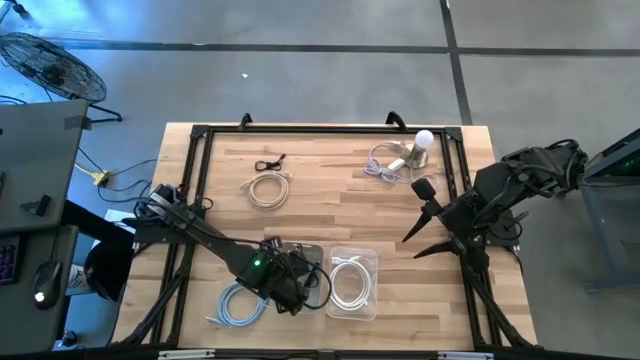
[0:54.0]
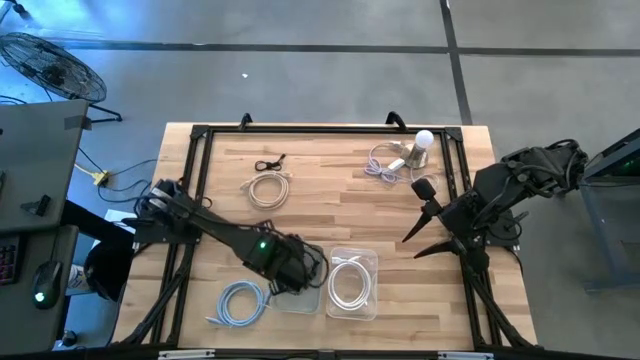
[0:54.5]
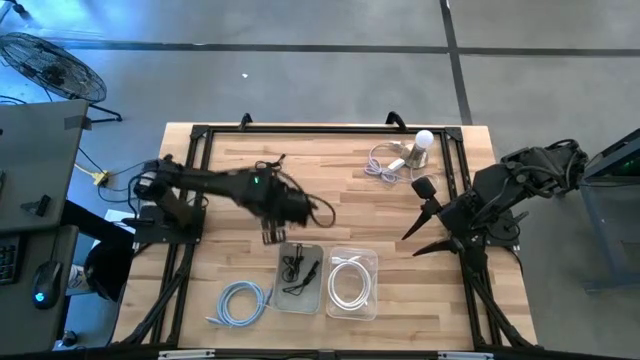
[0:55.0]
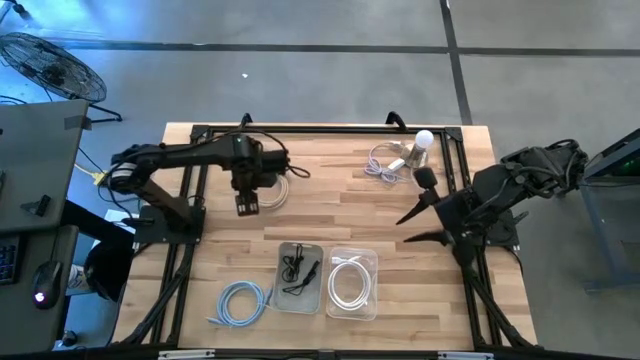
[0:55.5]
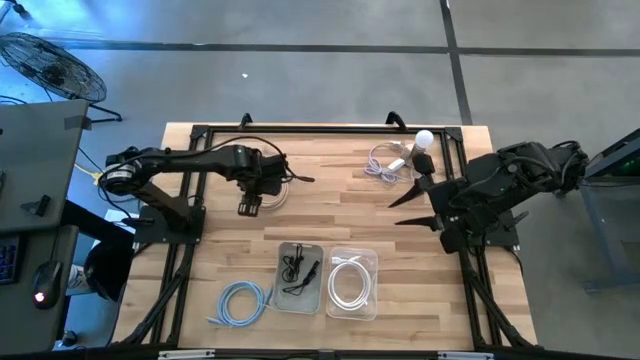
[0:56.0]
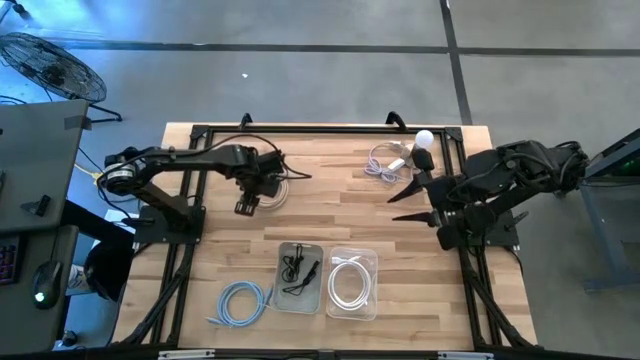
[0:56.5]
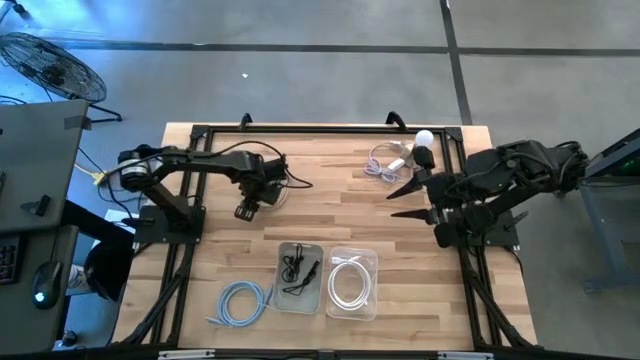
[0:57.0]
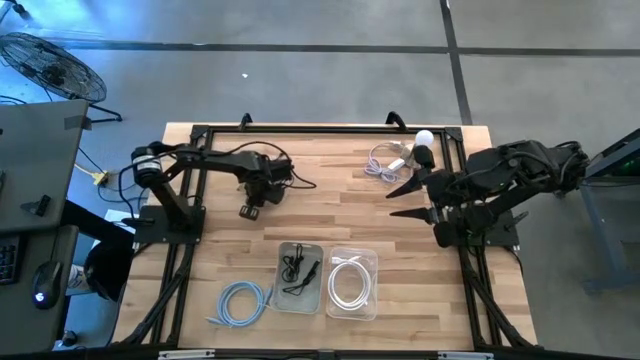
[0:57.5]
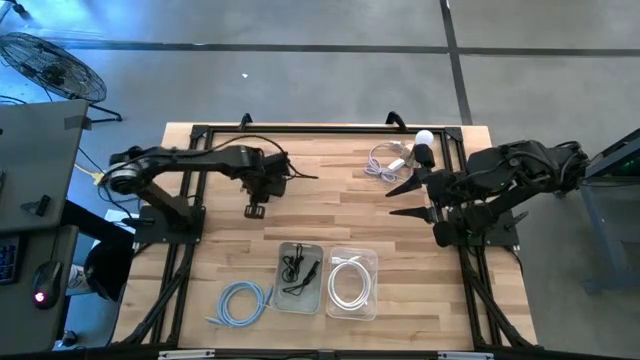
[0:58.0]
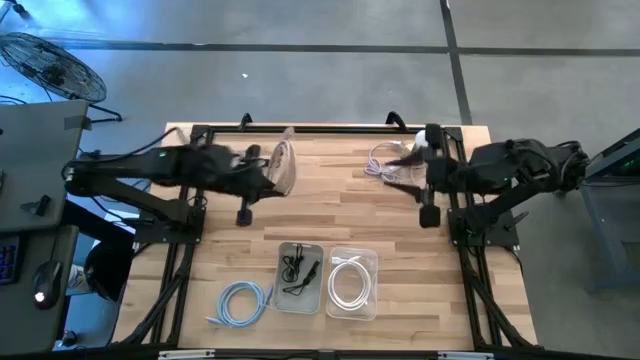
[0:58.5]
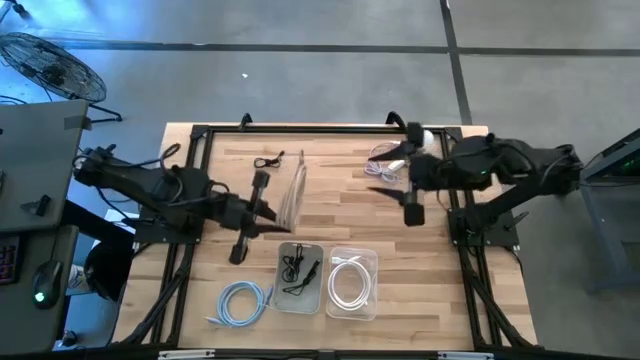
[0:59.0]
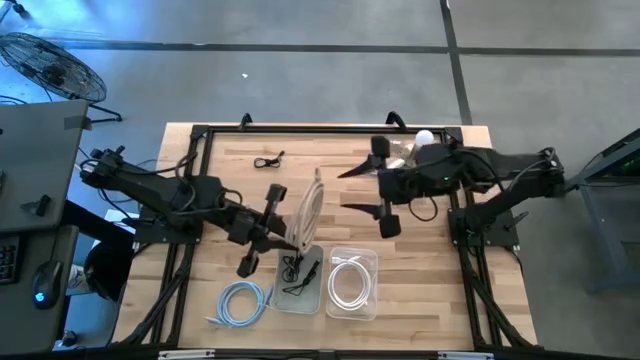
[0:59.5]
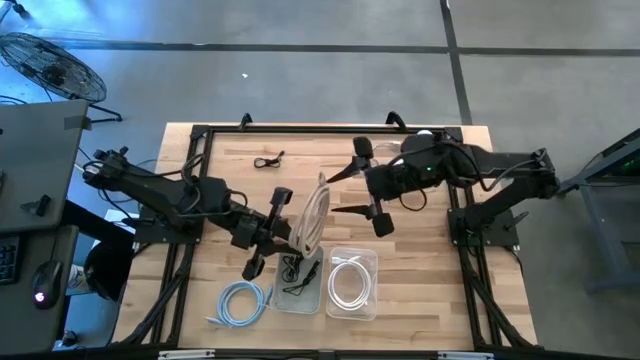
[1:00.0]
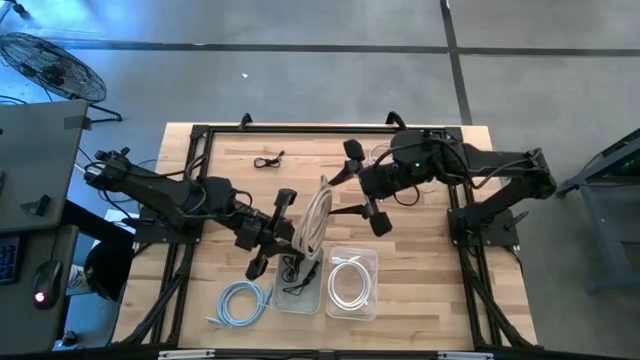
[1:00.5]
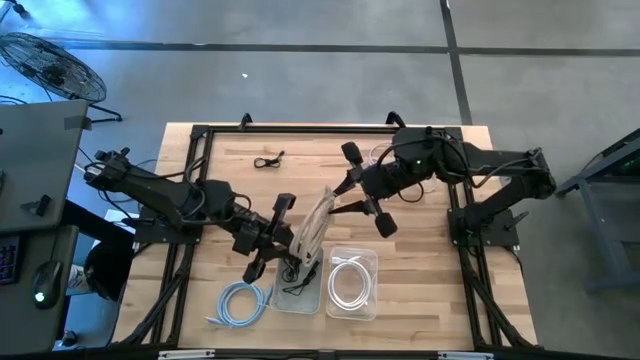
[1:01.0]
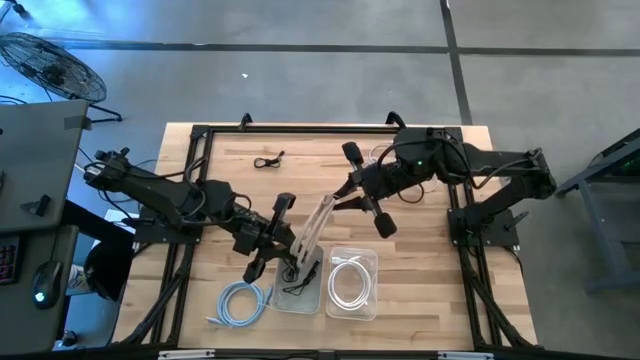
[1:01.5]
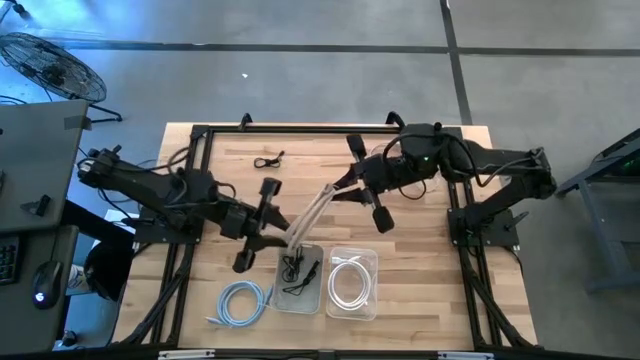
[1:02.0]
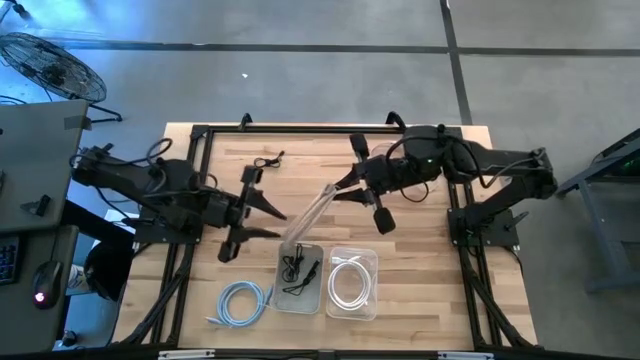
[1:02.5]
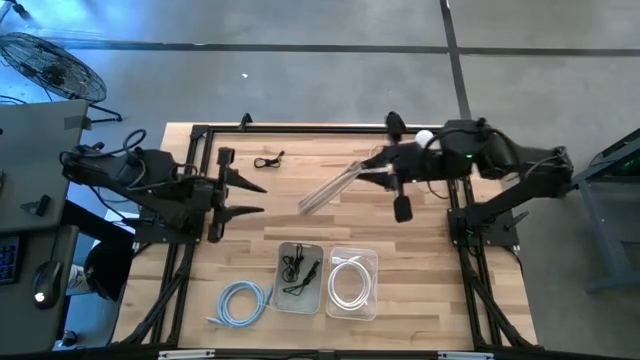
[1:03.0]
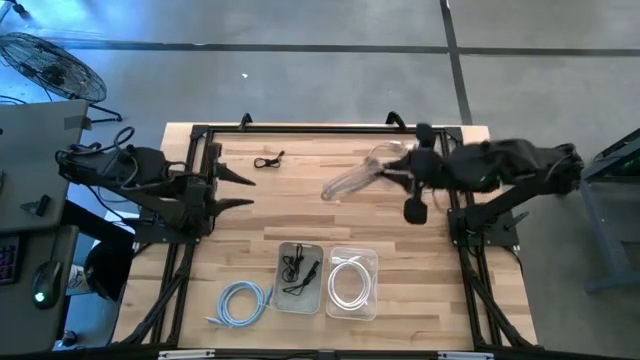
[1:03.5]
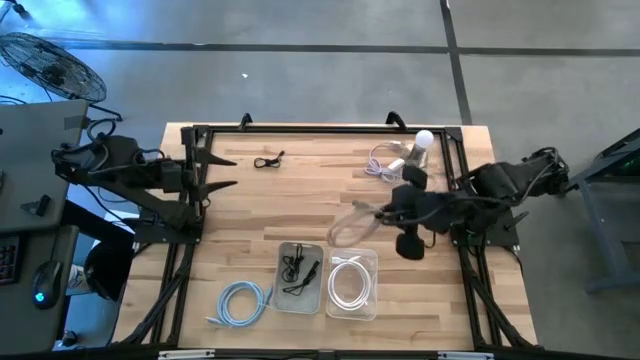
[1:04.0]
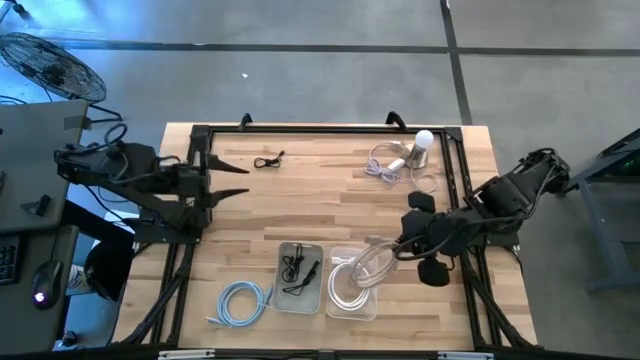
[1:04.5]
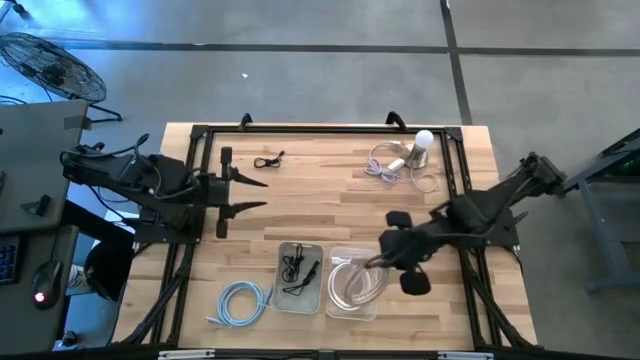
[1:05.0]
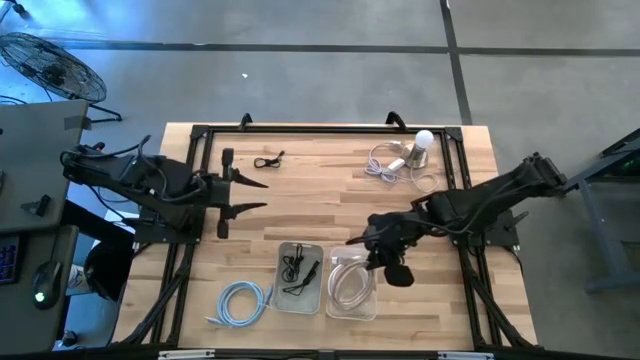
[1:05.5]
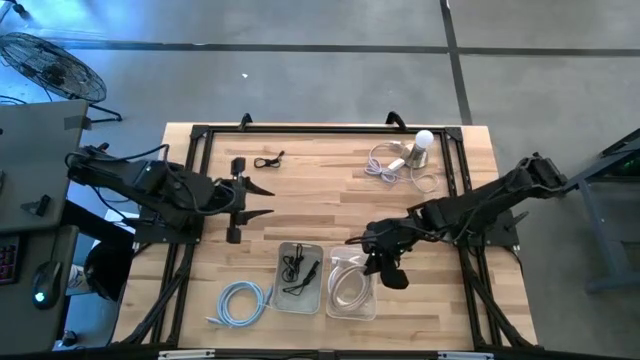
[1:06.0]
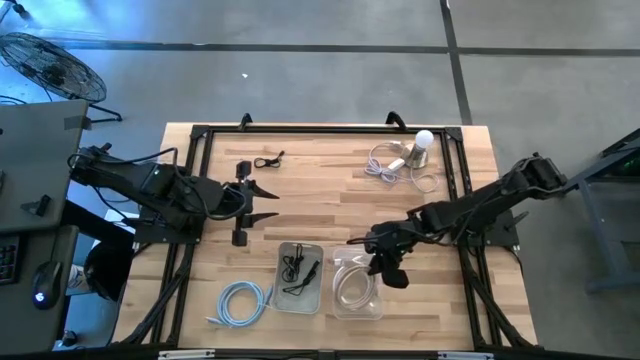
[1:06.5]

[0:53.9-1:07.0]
Task: Pick & Place USB Port
Put the brown HDMI cable into the transparent bin

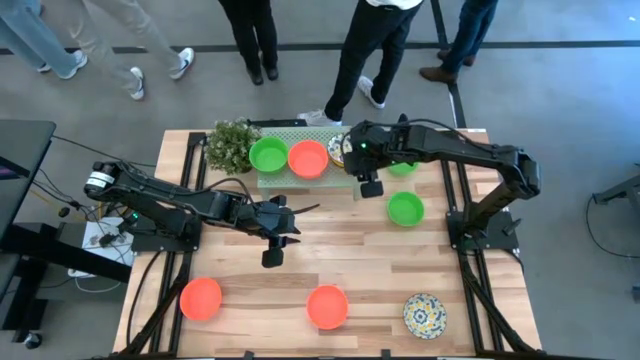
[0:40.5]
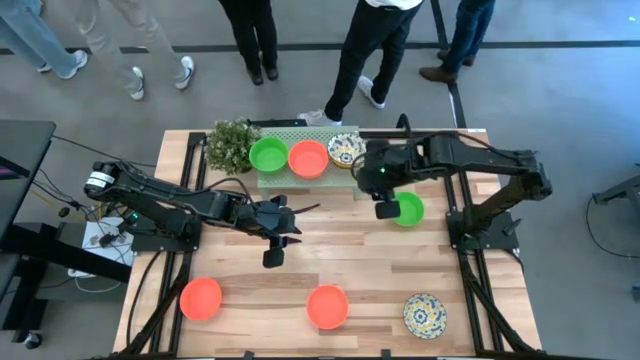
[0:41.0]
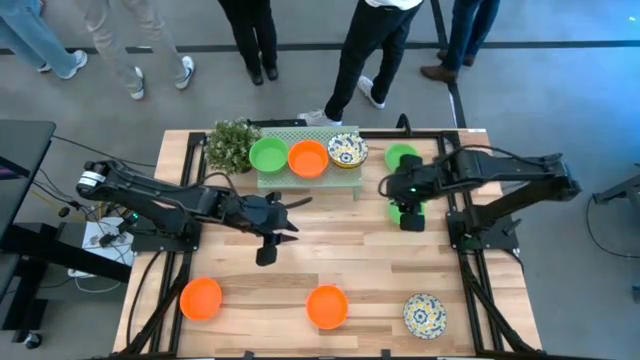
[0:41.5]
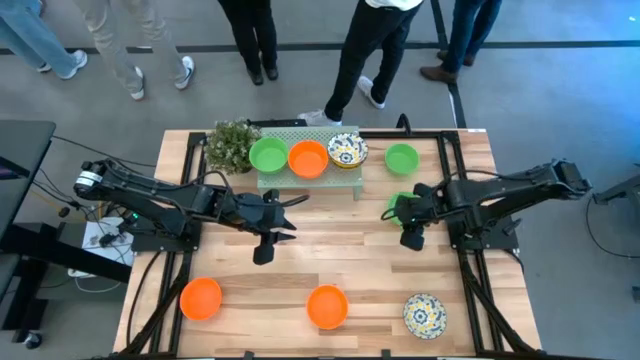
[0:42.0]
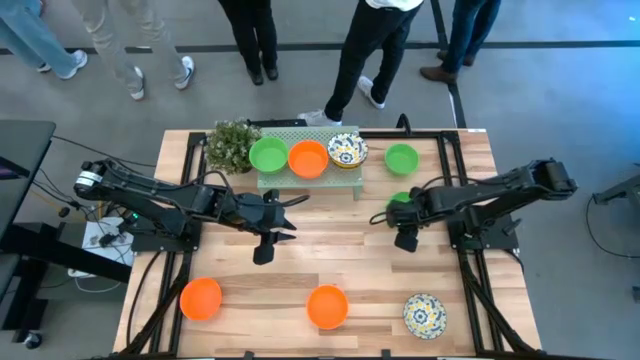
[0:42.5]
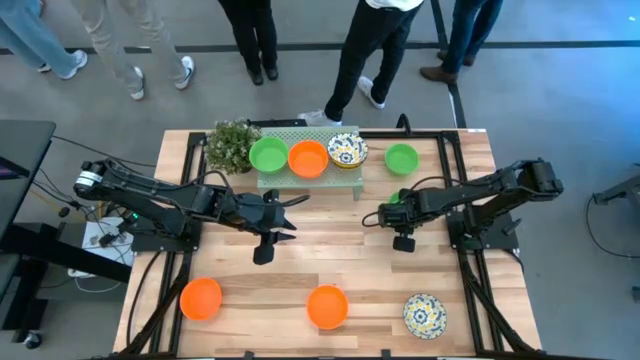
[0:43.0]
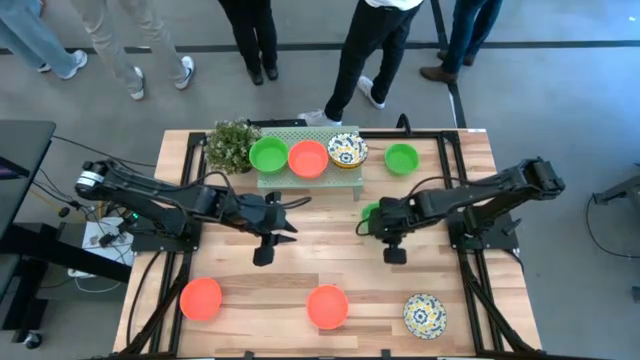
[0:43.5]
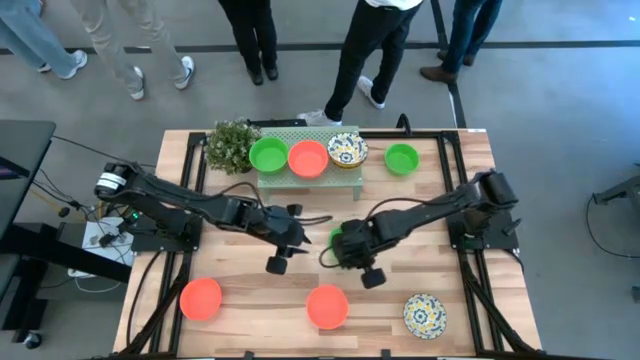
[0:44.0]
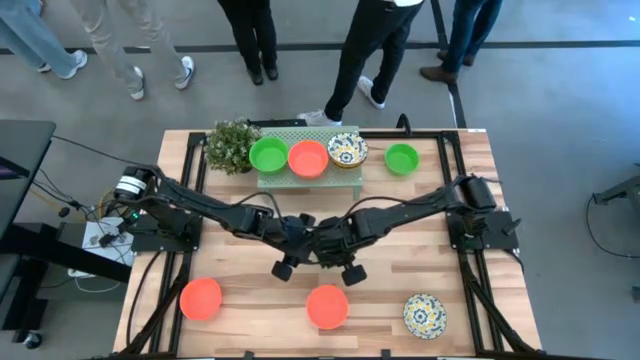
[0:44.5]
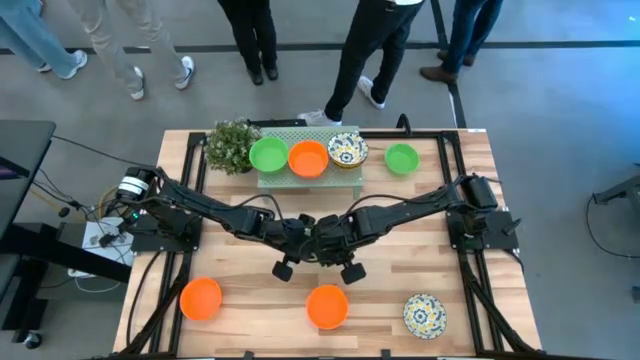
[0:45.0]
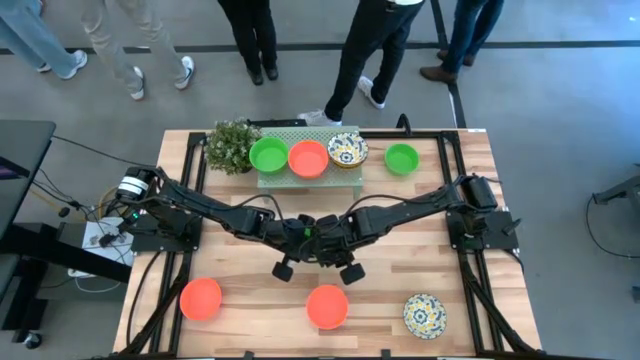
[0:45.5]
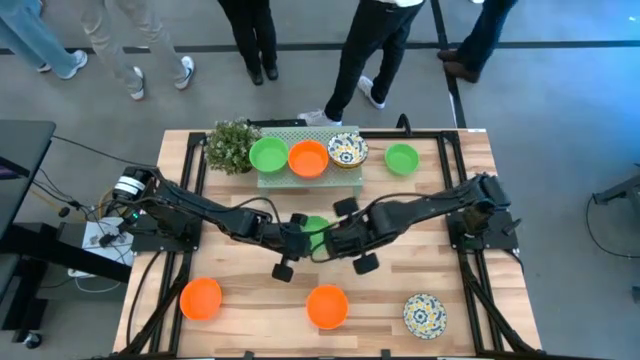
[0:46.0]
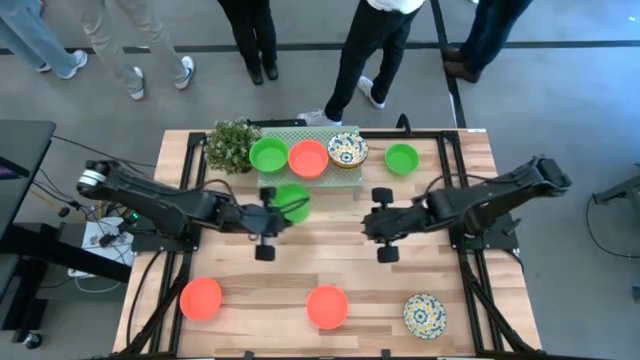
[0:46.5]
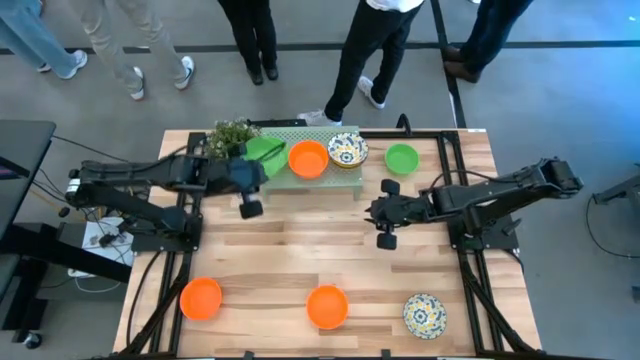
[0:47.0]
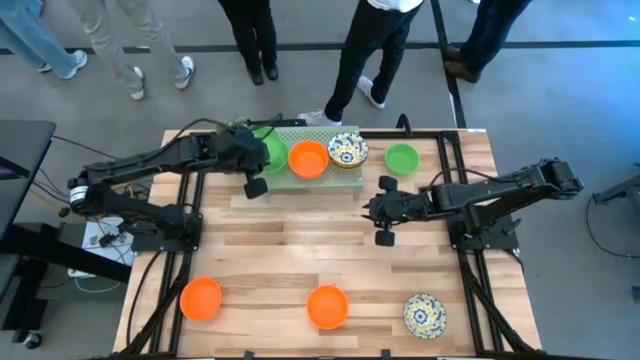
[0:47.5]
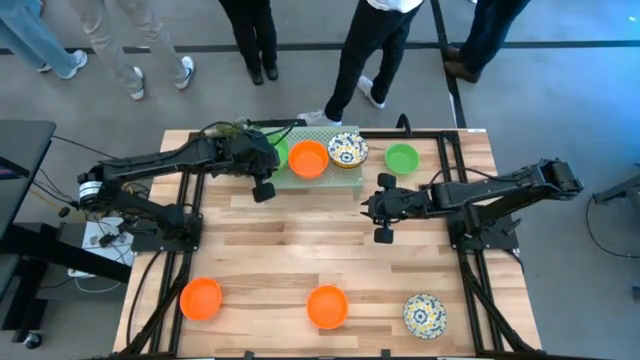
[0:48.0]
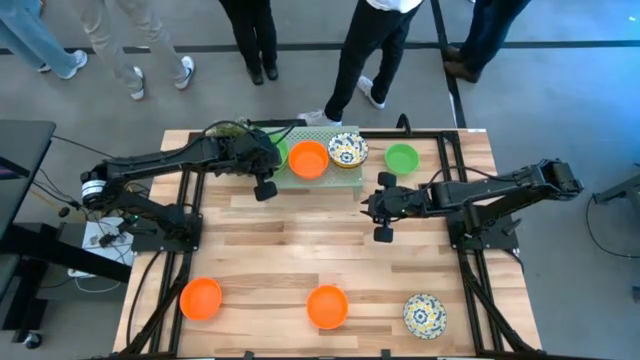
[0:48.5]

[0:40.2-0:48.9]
Task: Pick & Place Mini bowls
Stack the green bowl on top of the green bowl on the shelf
